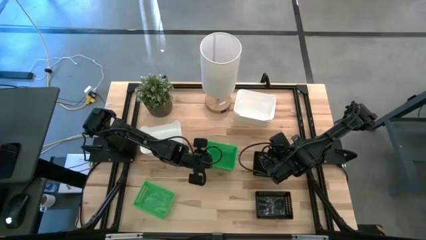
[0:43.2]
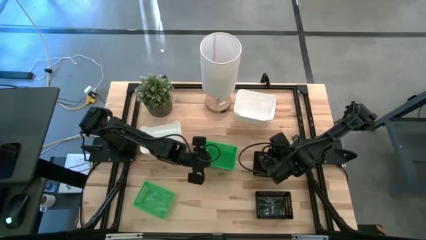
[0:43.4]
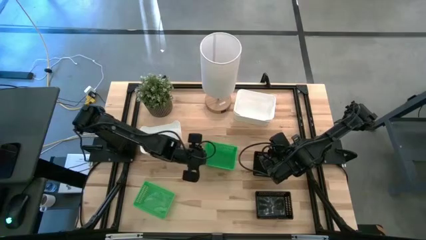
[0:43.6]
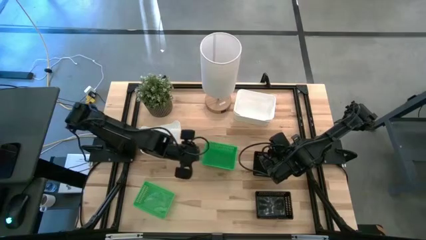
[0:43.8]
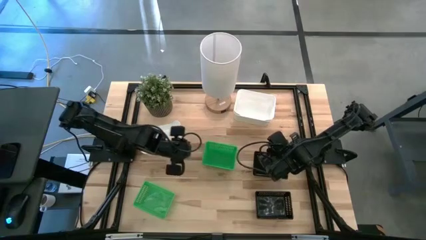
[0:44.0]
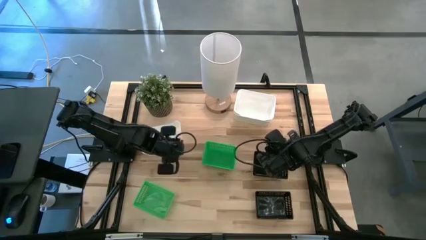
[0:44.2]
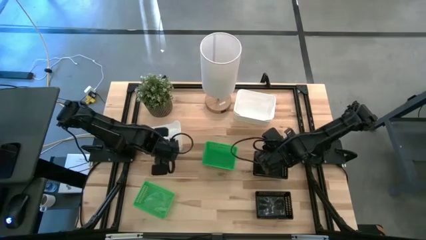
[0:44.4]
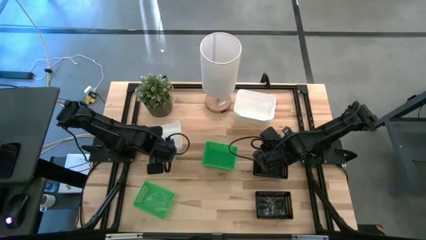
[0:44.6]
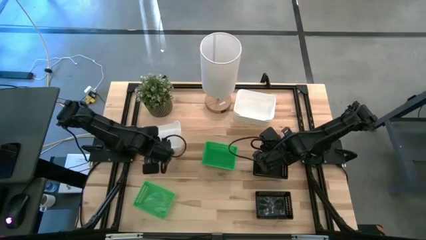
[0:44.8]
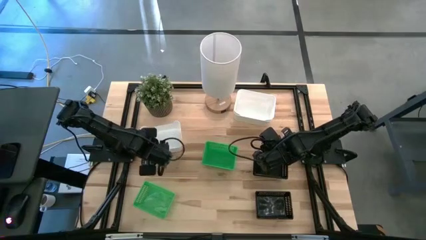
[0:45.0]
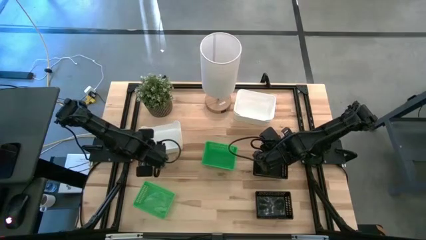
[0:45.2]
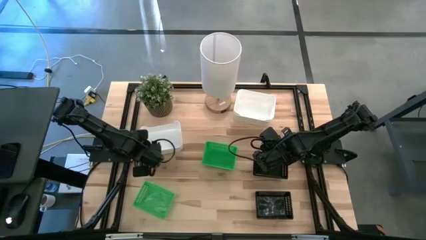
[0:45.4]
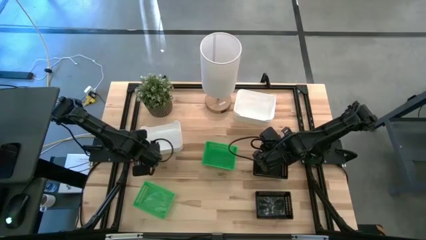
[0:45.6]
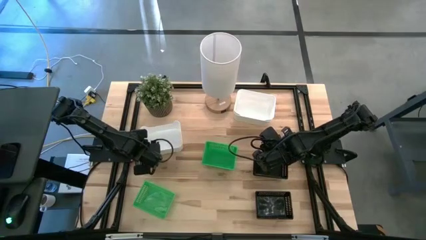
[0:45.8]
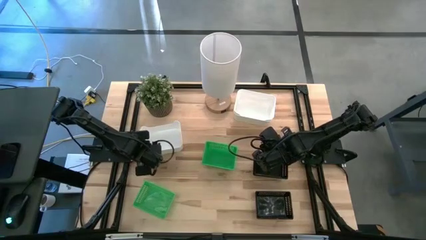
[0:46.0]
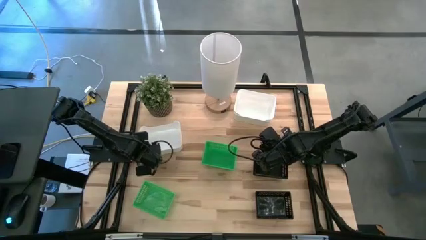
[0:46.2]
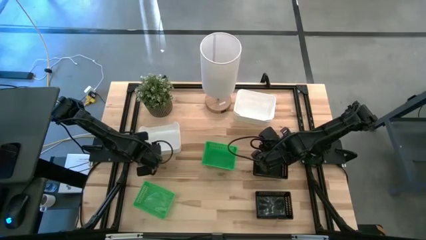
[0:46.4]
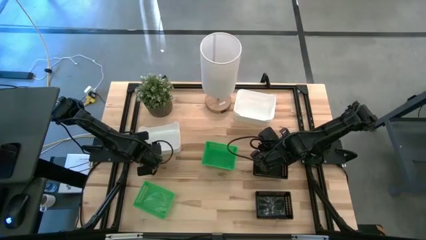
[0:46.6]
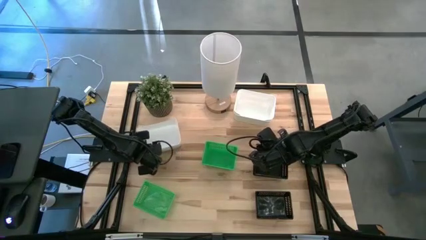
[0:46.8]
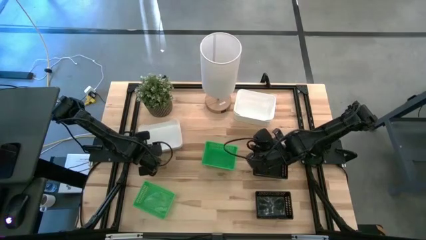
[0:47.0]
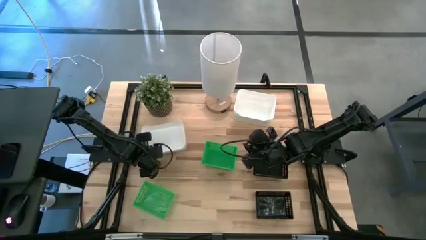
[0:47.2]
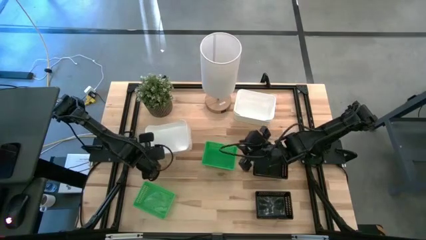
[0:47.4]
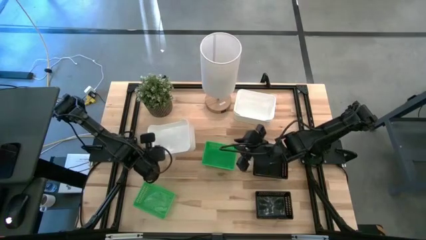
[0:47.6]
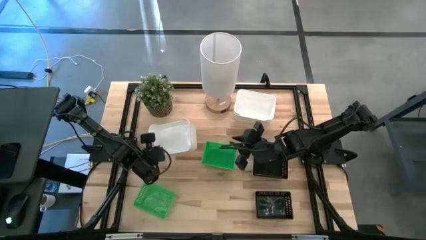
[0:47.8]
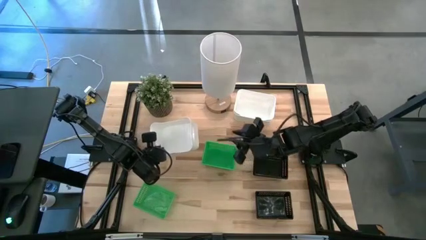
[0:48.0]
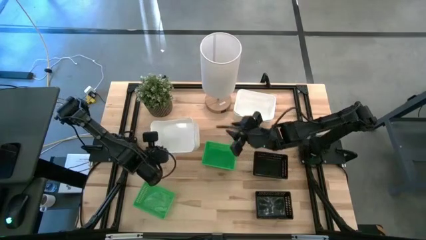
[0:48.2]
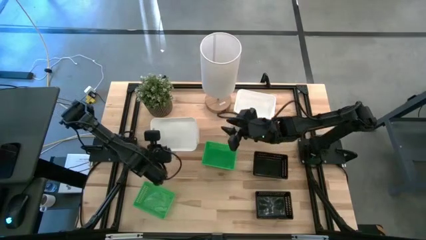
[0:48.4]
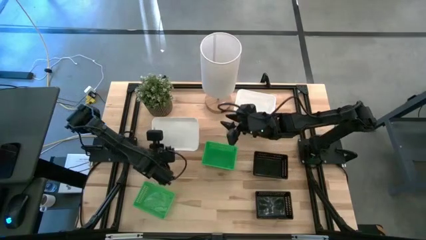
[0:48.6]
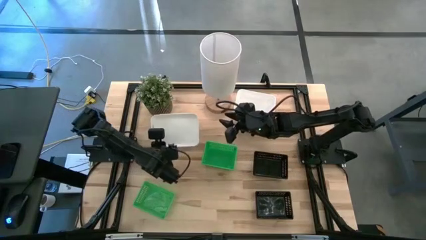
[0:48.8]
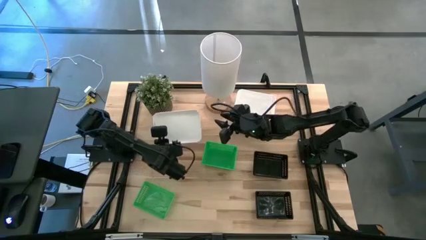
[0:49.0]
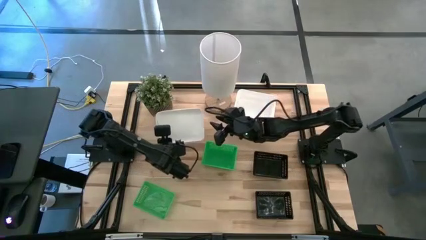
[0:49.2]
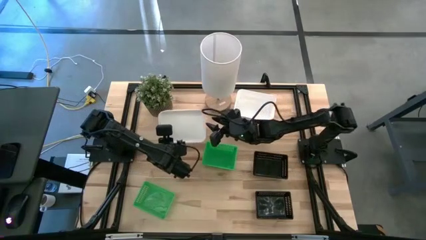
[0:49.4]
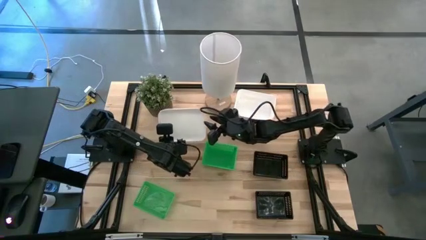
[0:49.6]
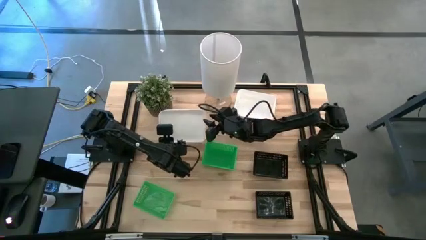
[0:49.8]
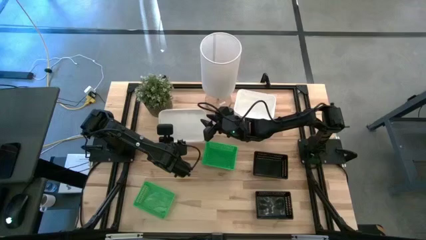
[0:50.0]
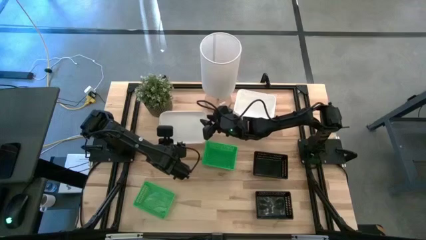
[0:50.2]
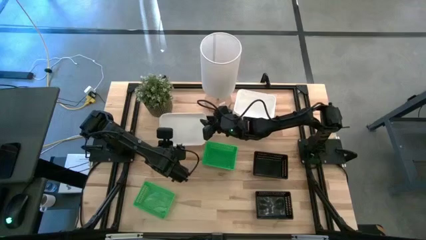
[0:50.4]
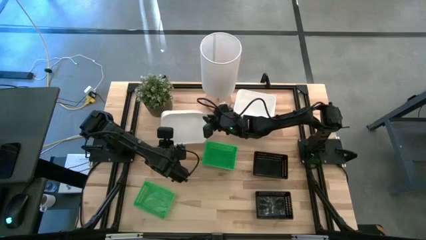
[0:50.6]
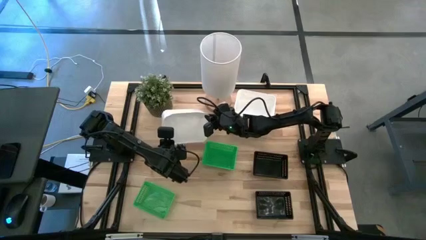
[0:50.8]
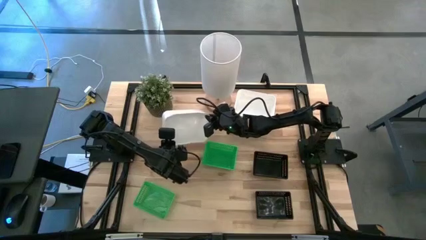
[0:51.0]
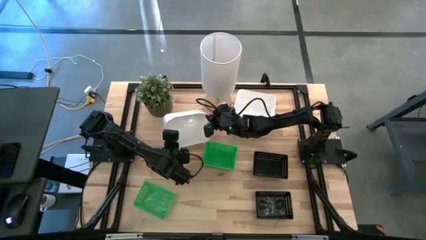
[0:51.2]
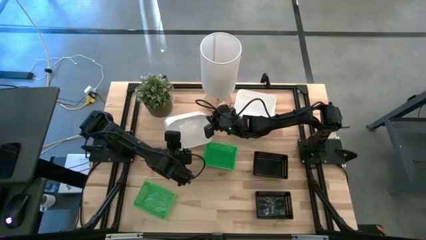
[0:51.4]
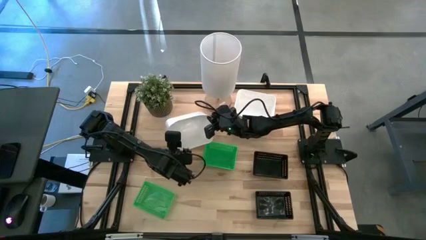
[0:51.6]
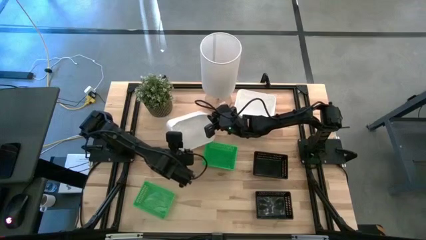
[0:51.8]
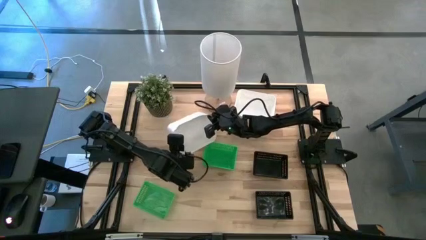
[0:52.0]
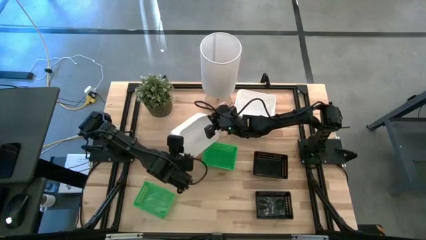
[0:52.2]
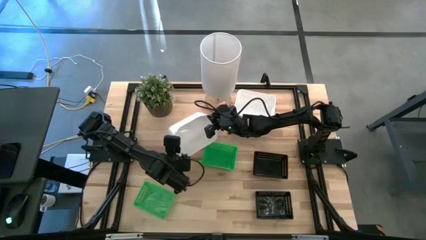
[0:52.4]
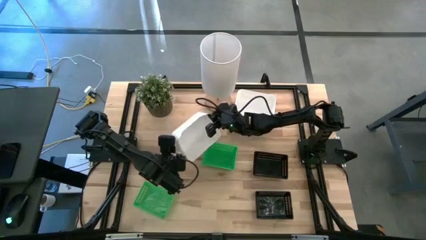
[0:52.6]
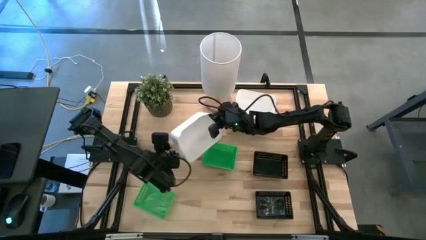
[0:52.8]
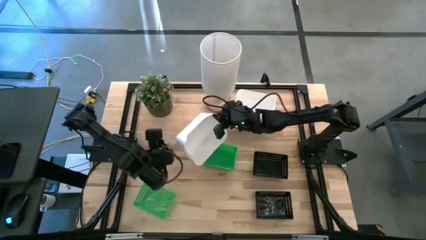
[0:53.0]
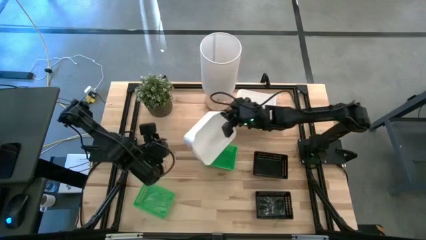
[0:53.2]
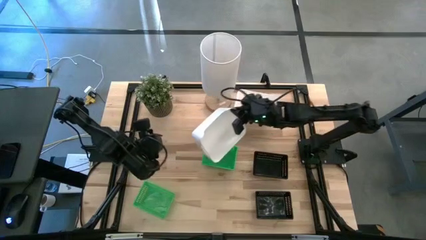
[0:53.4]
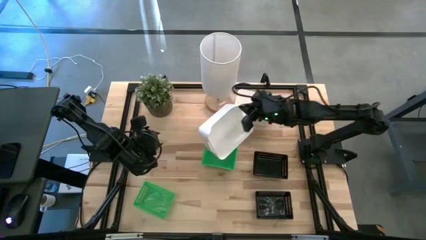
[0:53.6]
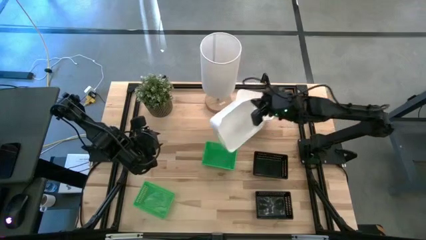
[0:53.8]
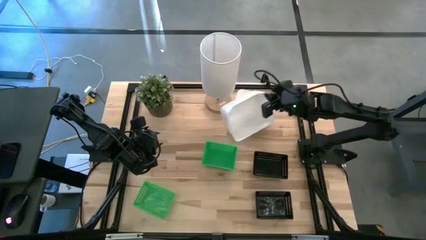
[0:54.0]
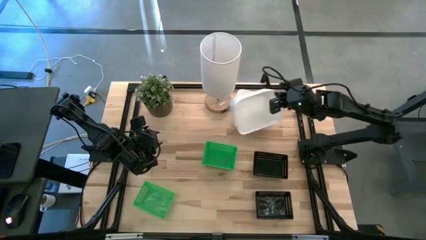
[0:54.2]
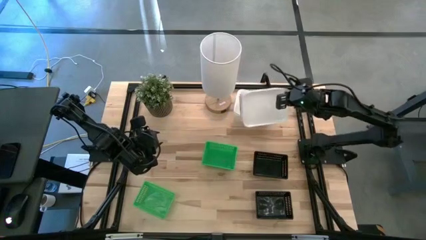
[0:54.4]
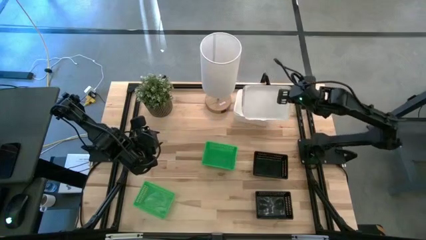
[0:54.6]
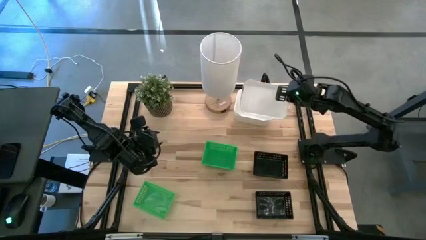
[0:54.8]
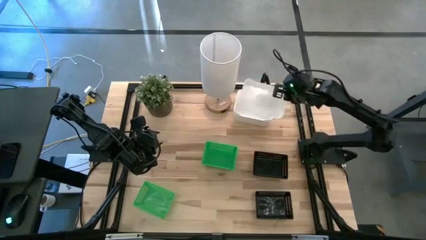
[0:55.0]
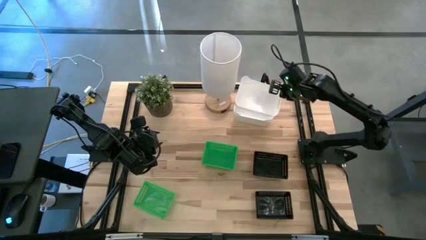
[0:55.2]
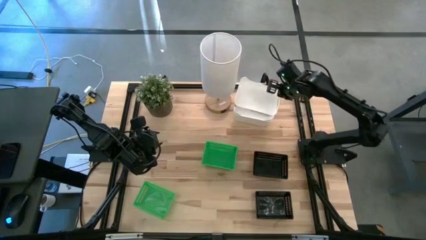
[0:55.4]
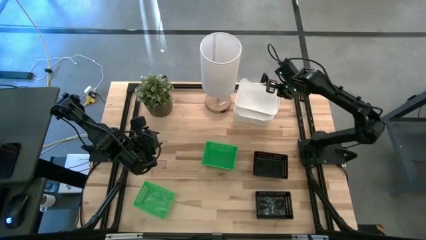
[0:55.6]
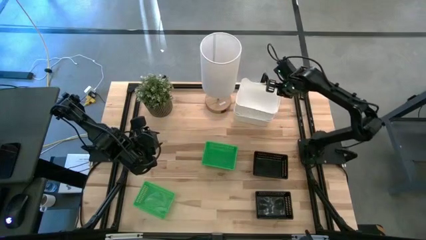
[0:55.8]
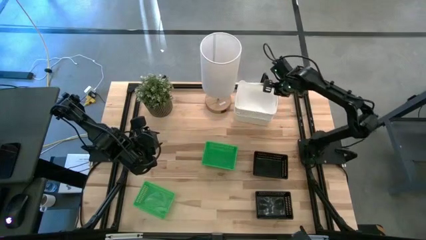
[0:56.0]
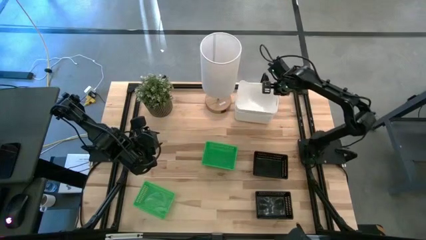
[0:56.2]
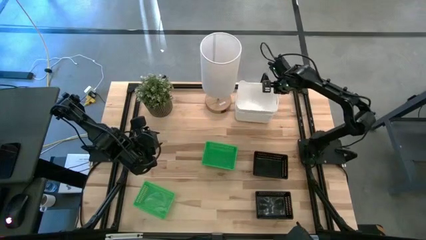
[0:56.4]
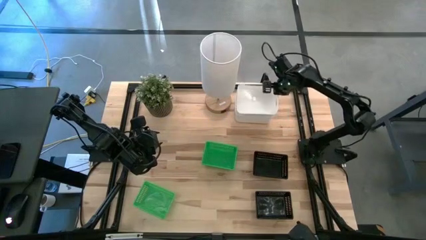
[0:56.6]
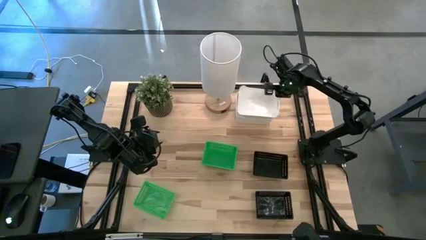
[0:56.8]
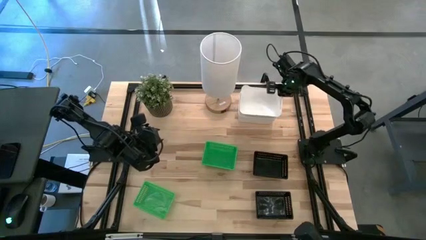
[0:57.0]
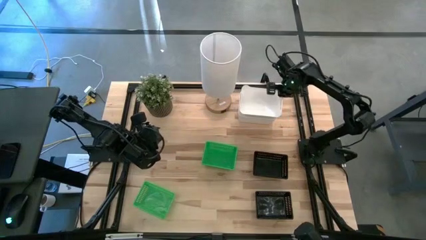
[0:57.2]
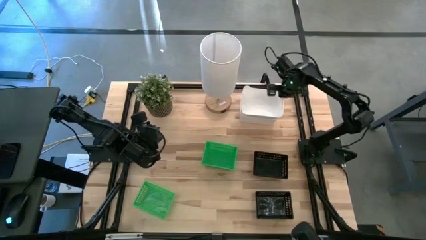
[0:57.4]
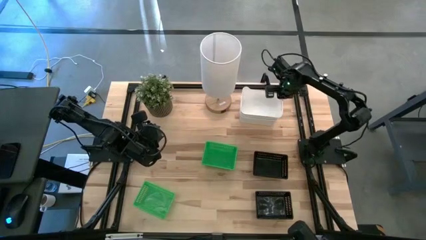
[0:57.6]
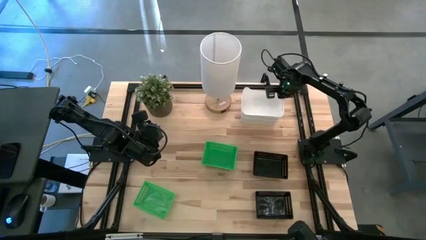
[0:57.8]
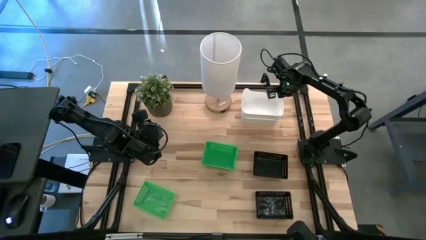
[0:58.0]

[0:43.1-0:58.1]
Stack the white bin on top of the stacked white bins
